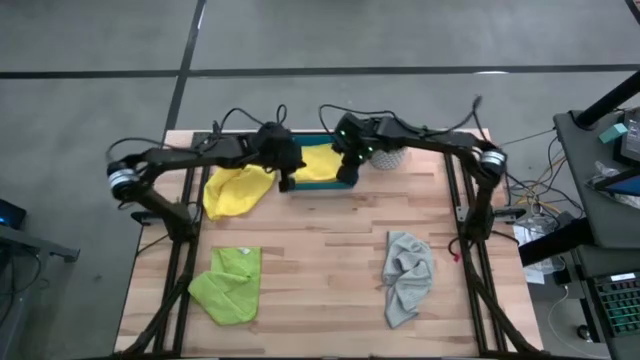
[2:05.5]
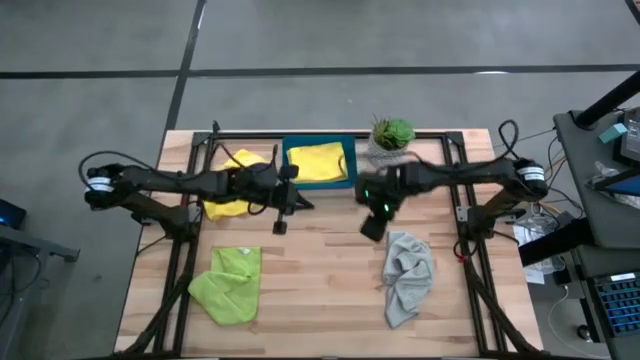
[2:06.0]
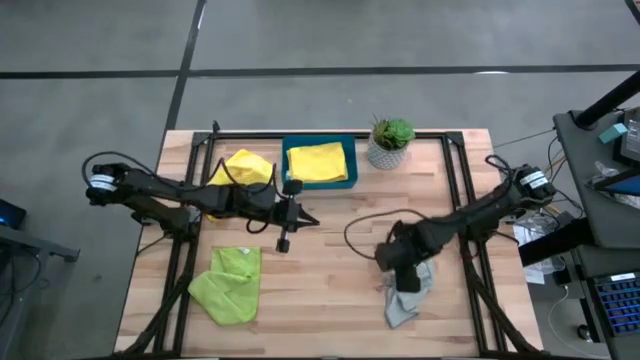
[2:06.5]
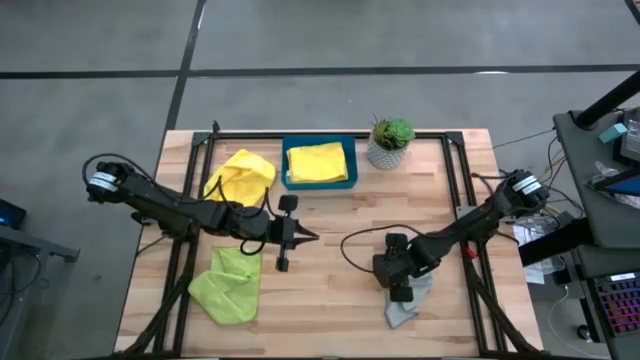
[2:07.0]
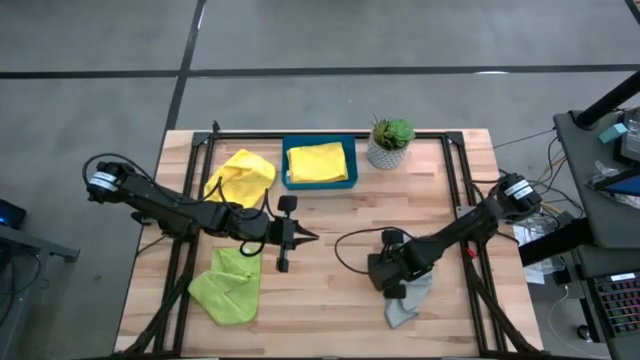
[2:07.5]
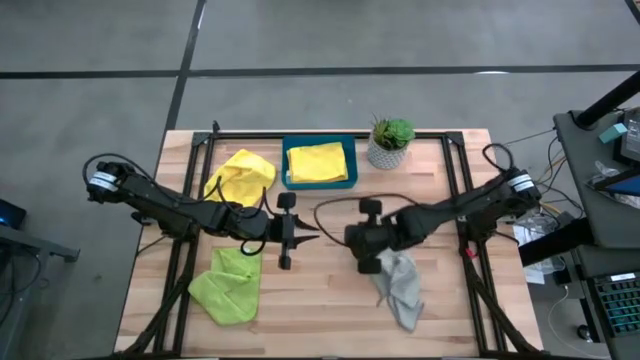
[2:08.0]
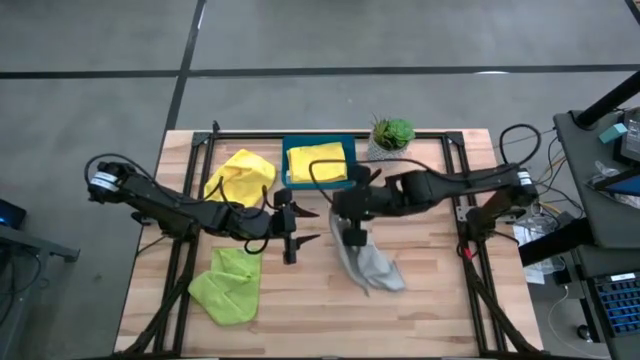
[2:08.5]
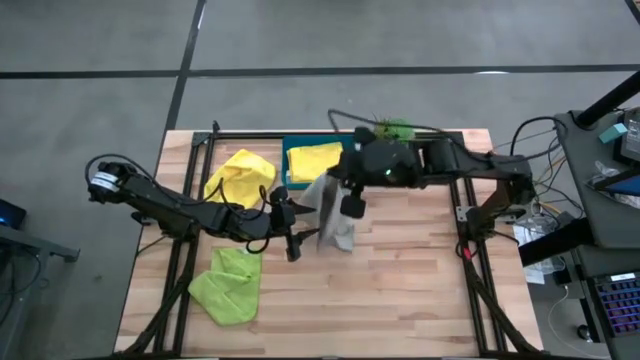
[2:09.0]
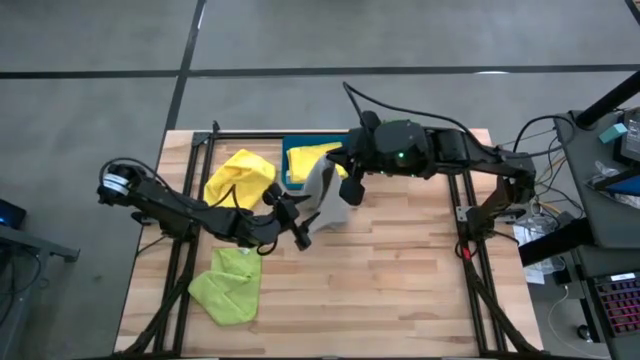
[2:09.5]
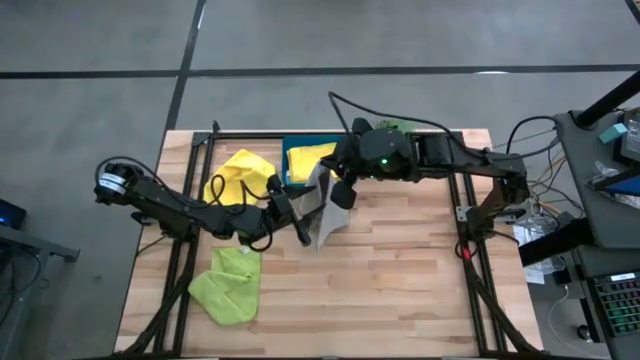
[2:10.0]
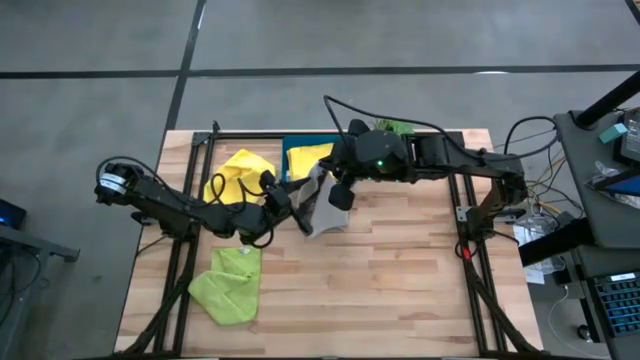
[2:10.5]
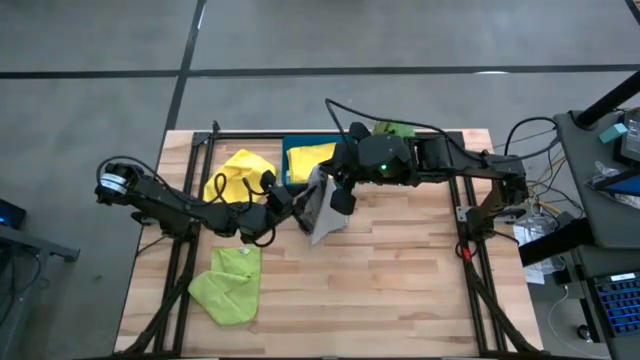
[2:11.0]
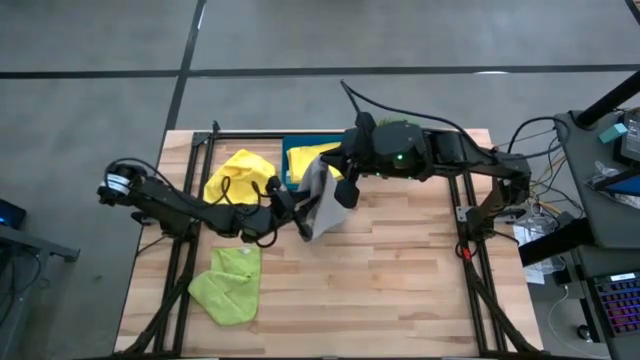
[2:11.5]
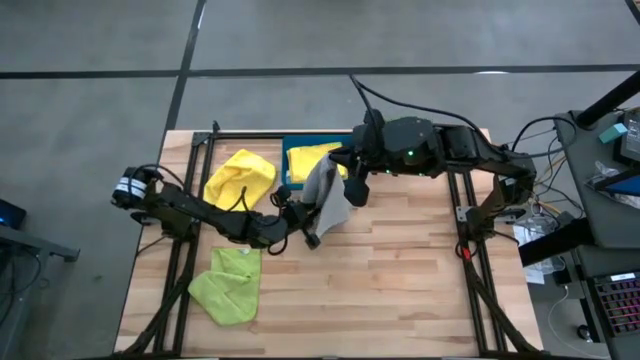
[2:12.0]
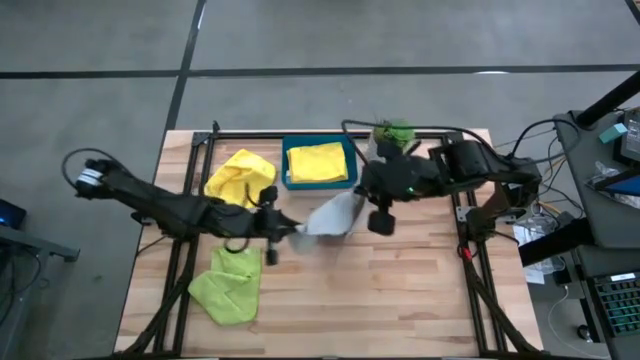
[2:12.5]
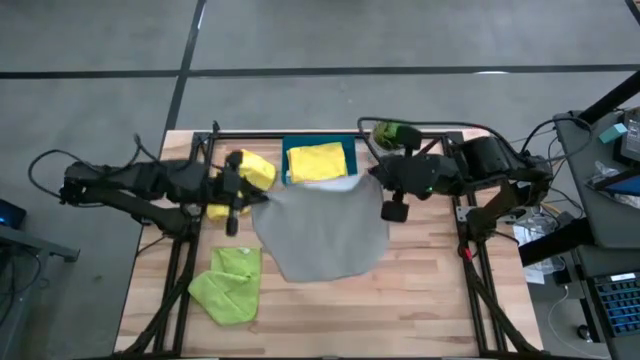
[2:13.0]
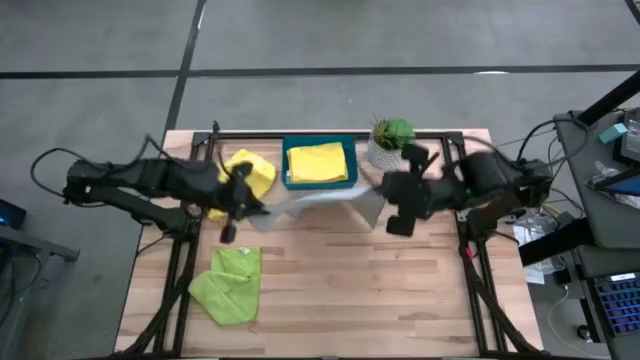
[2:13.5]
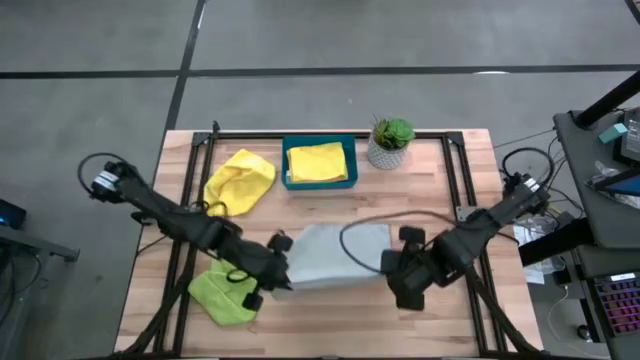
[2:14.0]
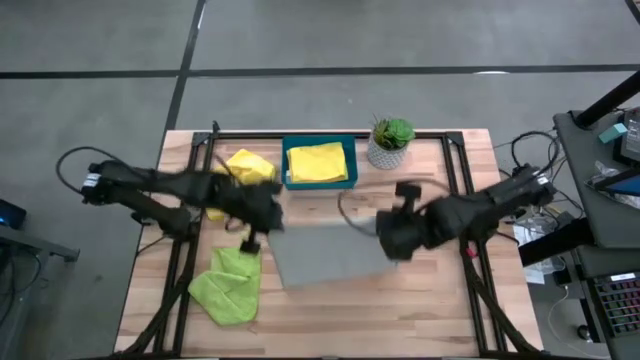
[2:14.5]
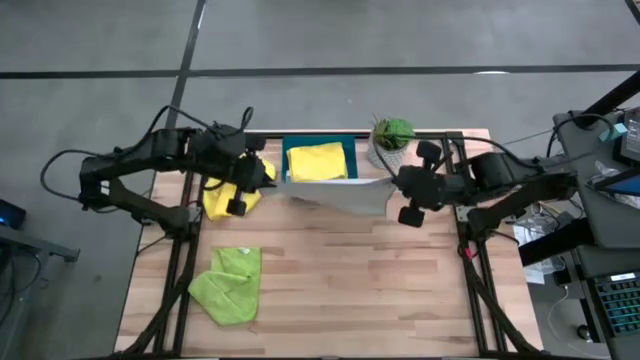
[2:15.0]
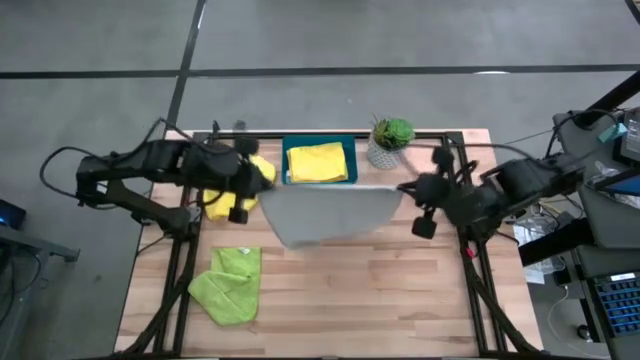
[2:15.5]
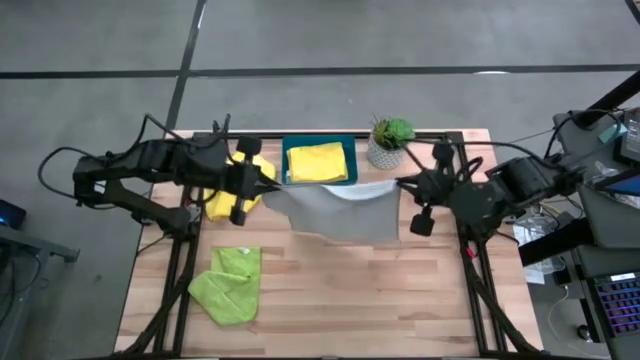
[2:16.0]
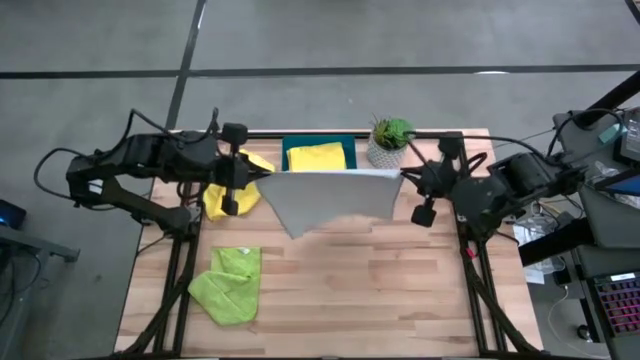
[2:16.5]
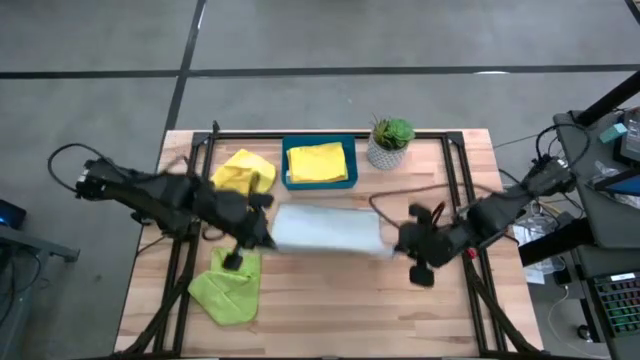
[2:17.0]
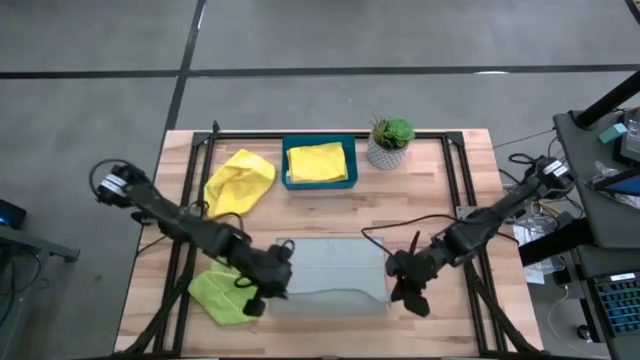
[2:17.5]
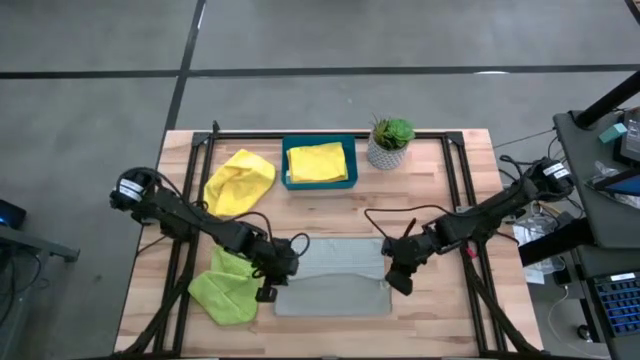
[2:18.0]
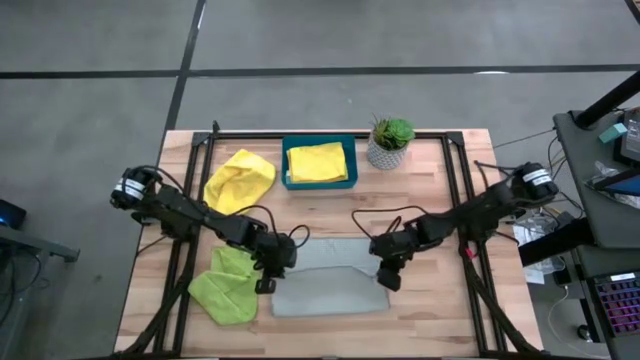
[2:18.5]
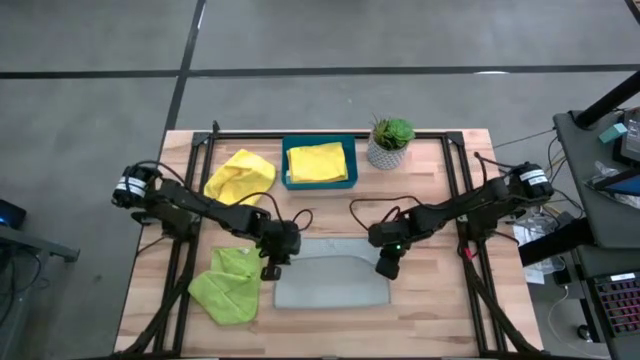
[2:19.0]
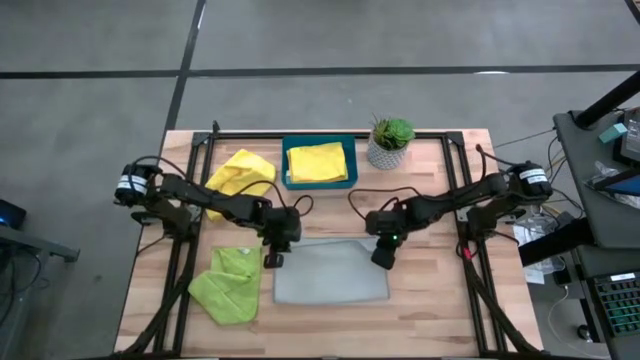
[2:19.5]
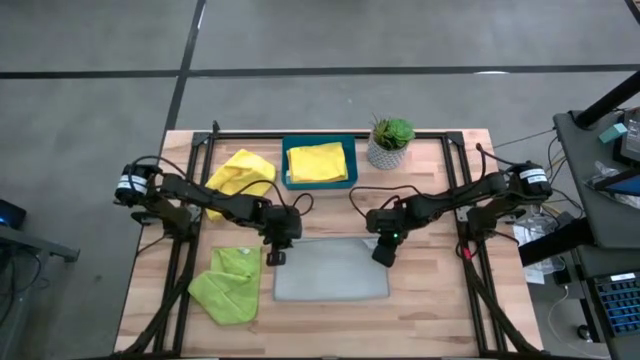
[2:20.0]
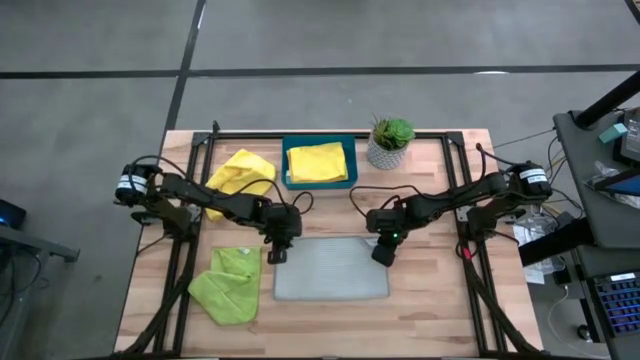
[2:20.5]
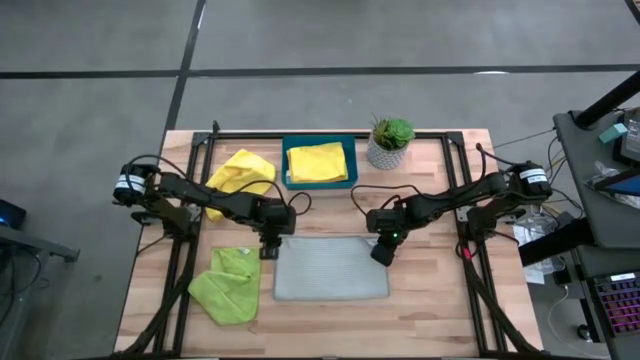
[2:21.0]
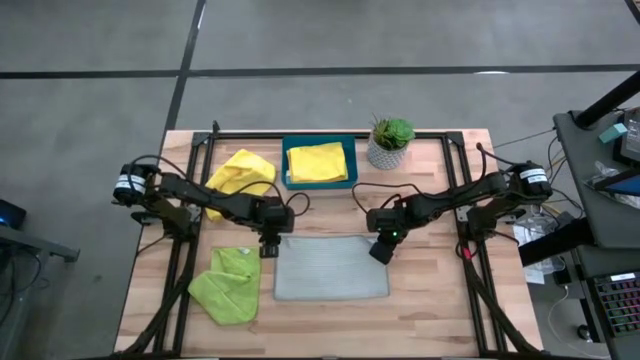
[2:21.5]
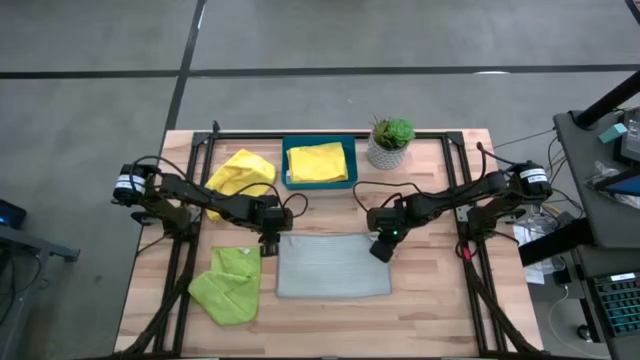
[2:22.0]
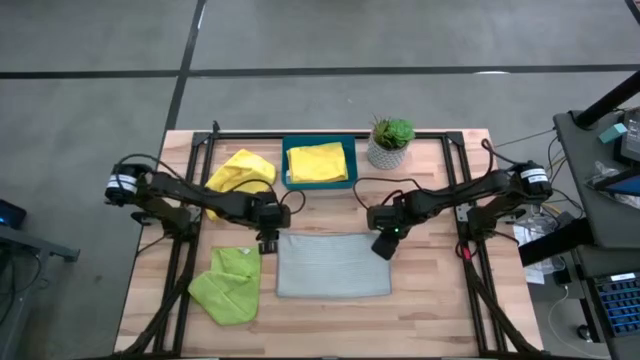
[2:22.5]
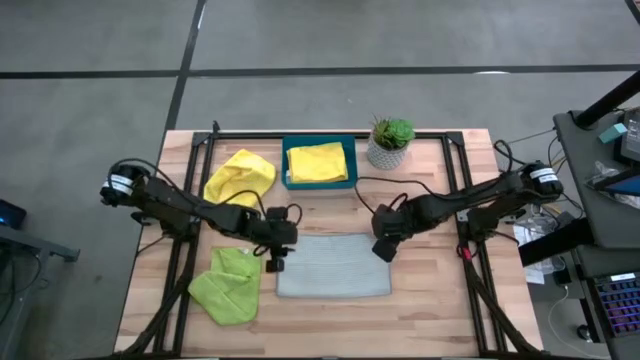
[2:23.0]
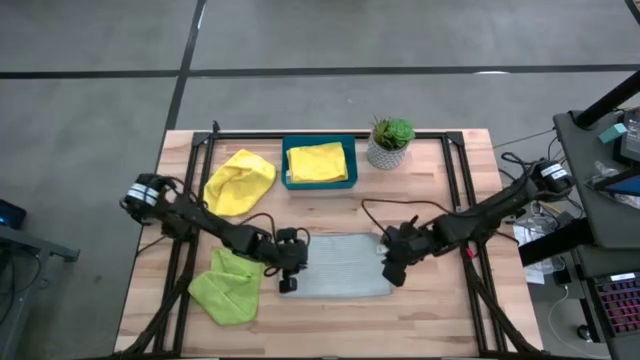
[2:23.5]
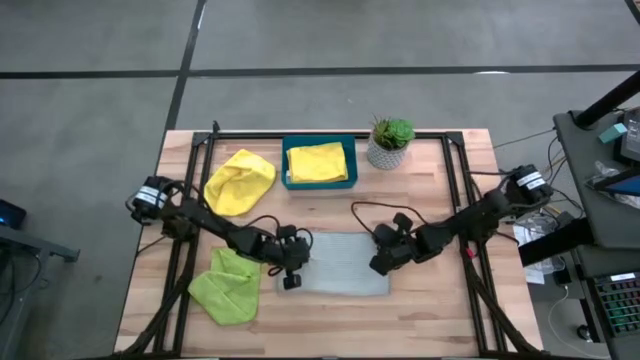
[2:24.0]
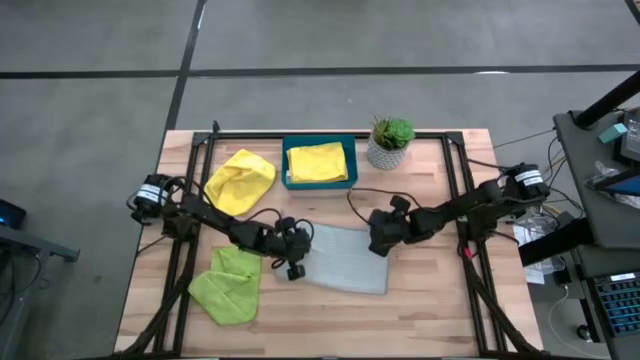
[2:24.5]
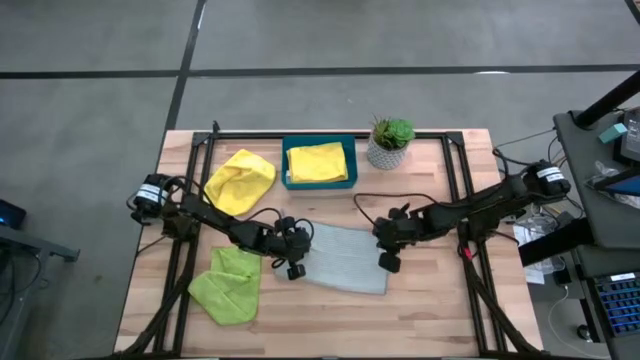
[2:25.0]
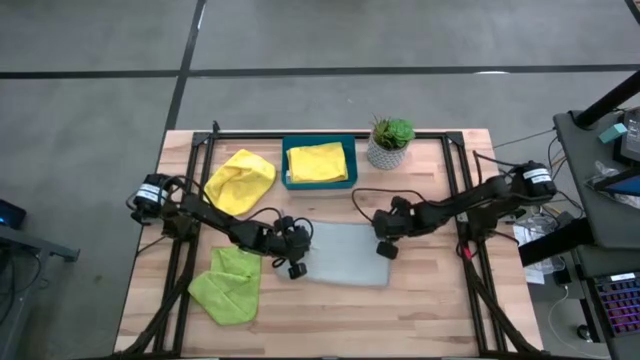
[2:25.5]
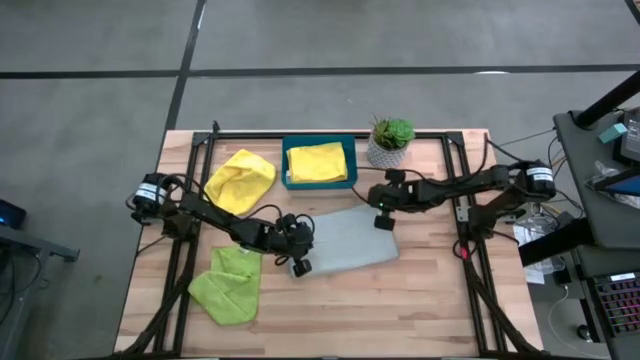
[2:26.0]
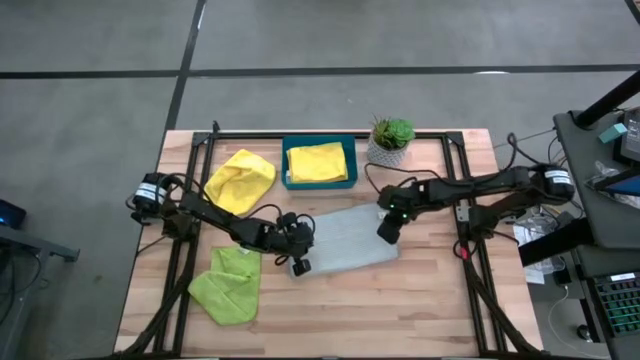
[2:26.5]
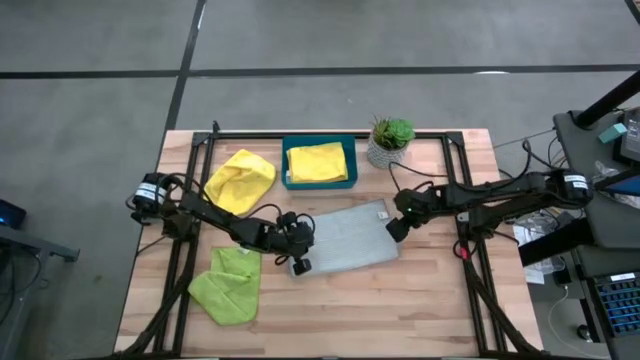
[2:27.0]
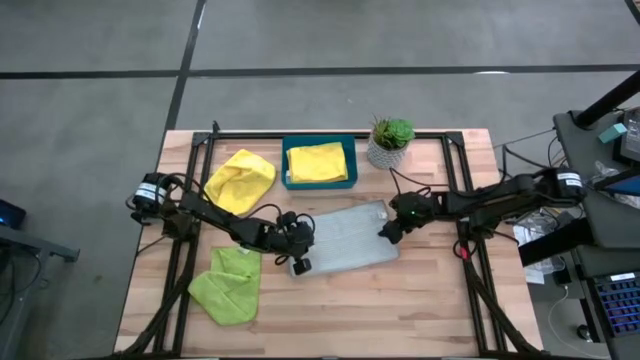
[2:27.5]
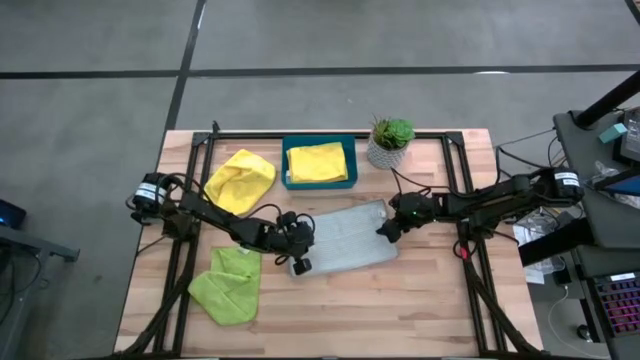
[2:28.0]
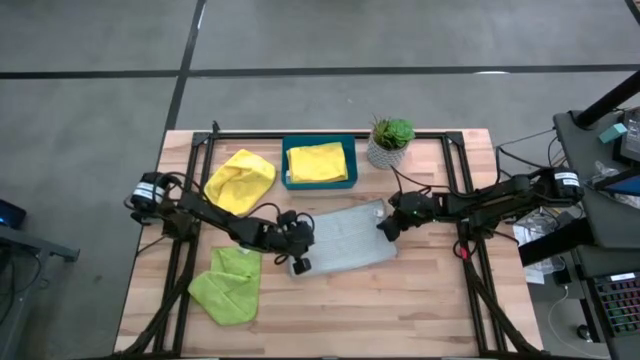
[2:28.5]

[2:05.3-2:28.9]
Task: Fold microfiber towels
Fold the gray microfiber cloth
